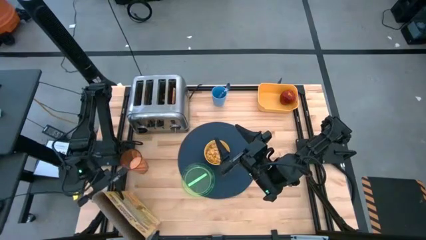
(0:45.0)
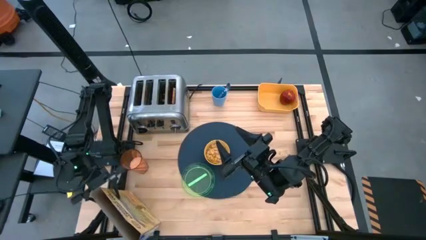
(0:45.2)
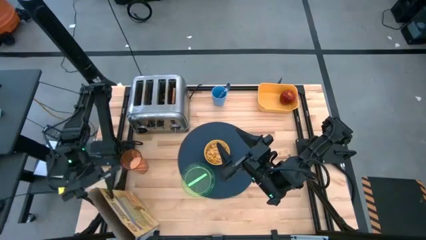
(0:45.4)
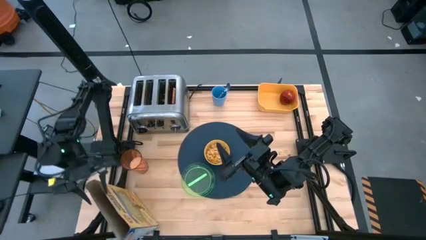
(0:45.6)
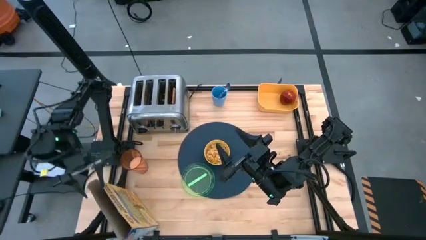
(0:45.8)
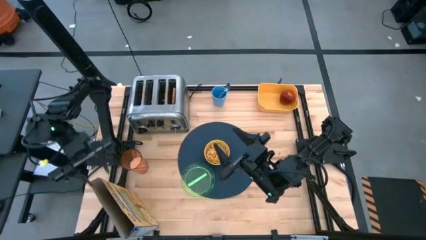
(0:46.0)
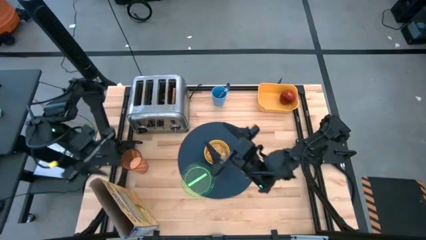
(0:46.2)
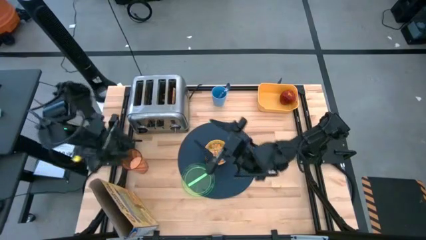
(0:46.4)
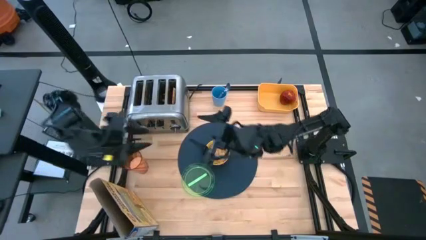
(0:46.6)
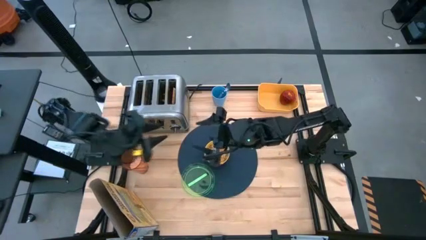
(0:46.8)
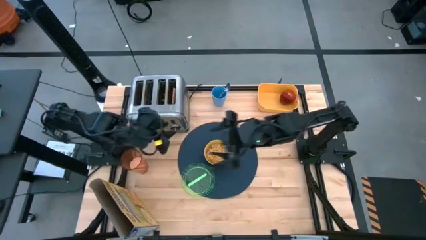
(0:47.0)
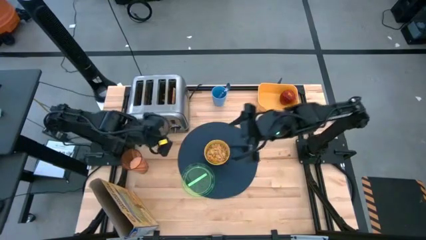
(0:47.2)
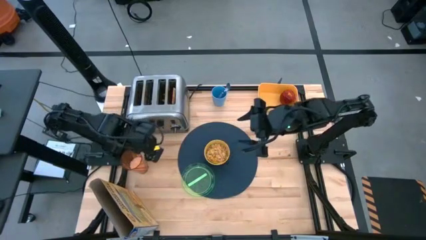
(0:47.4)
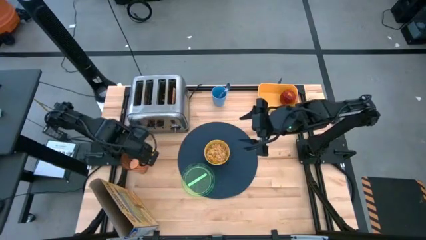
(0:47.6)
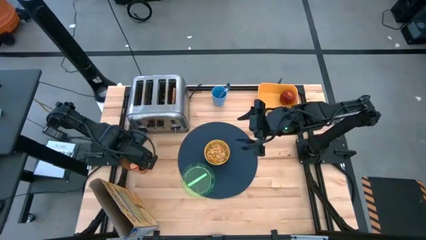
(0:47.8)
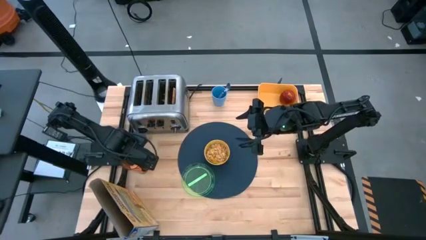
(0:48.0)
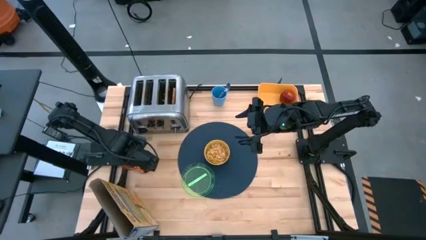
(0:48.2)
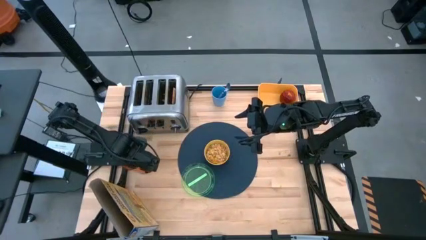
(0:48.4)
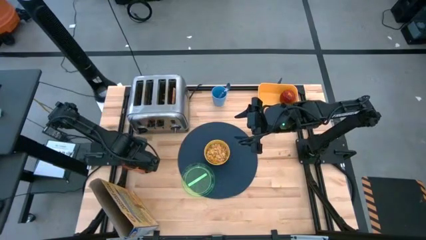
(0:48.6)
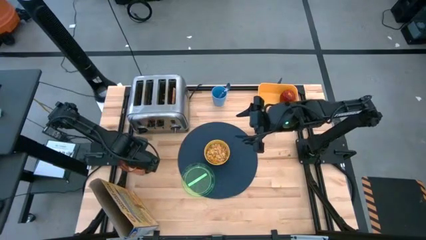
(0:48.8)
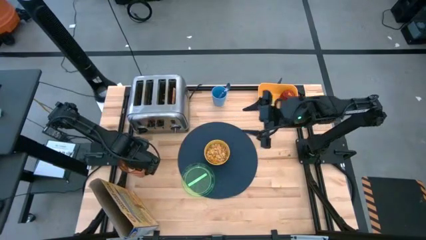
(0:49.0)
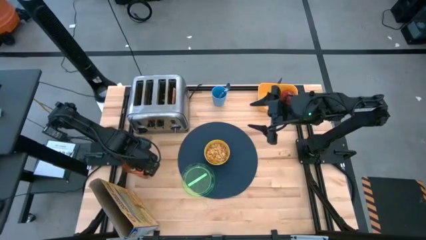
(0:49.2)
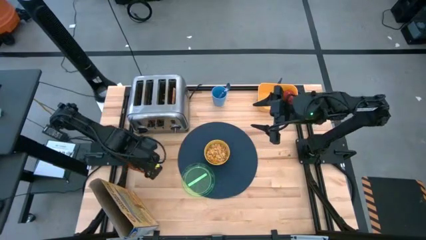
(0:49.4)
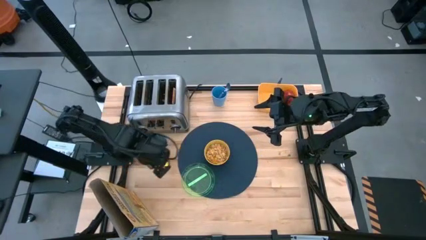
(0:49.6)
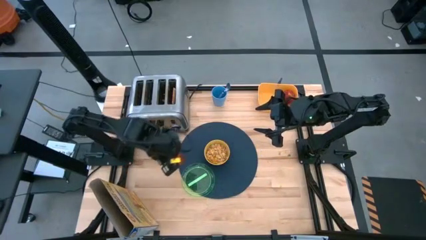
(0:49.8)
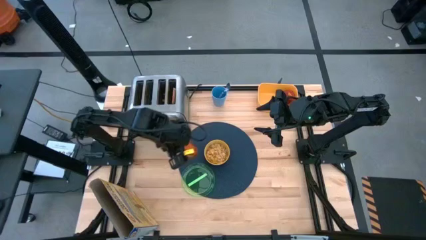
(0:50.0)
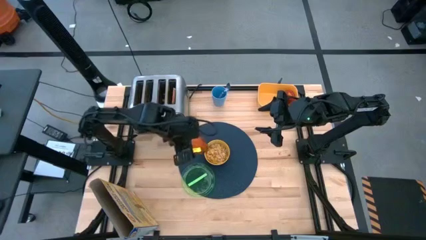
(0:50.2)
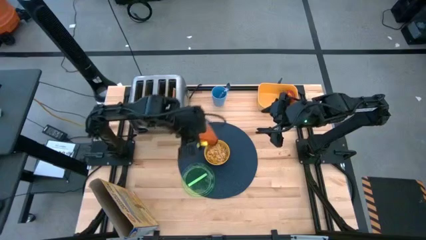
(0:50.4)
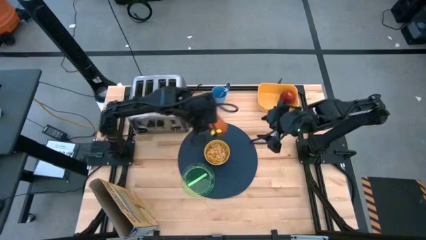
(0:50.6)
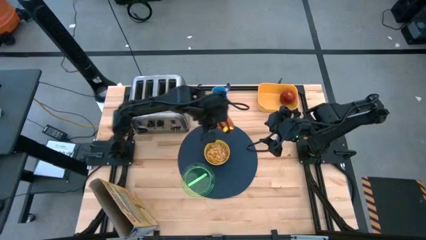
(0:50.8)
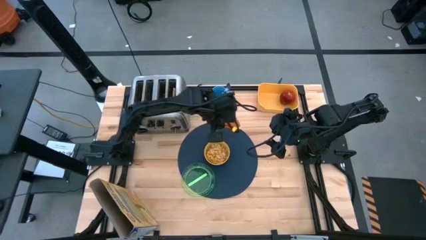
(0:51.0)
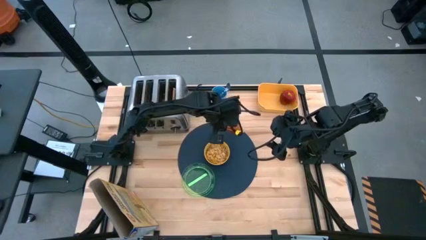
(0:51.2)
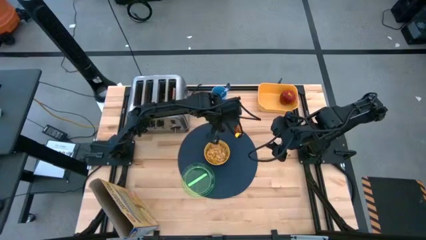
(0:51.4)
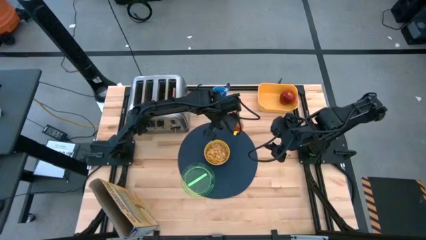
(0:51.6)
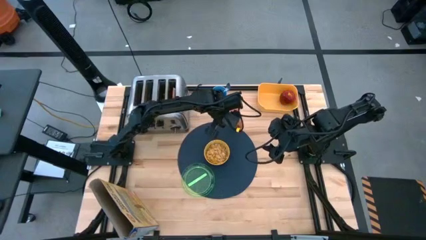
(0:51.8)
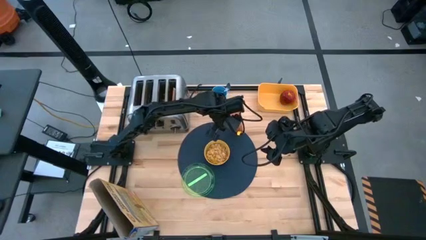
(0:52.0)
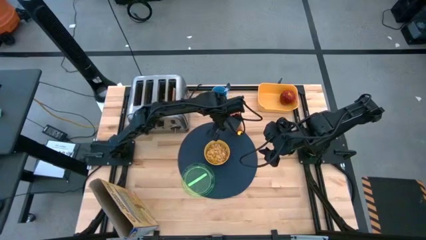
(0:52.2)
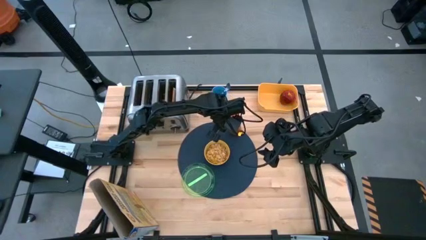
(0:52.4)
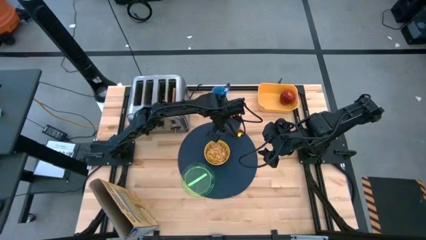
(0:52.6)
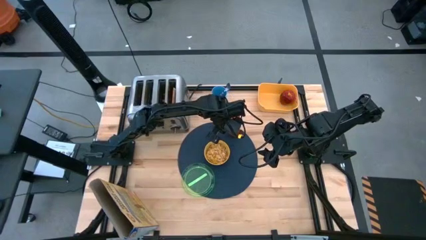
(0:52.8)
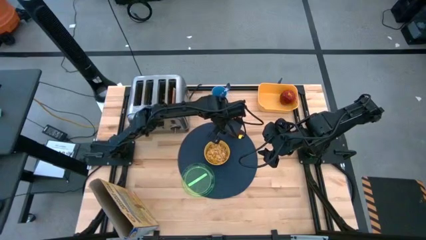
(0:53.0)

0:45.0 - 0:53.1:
Task: Arrange a breakfast setting
Put the cup of rice grain to the top right of the yellow bowl on the placemat

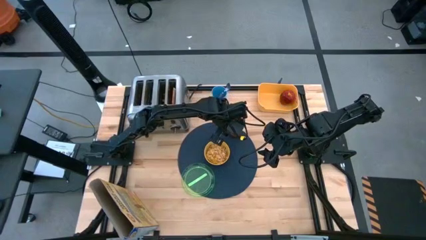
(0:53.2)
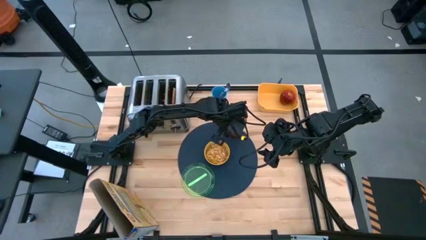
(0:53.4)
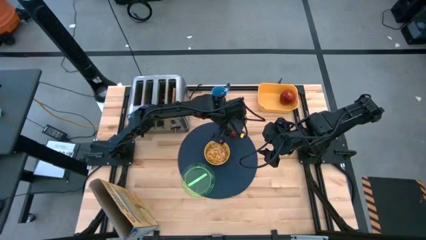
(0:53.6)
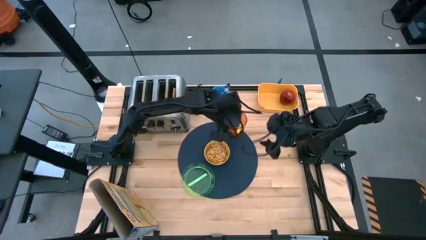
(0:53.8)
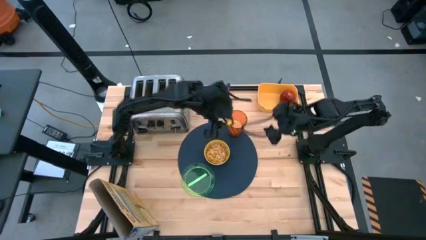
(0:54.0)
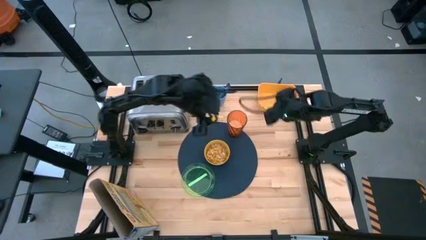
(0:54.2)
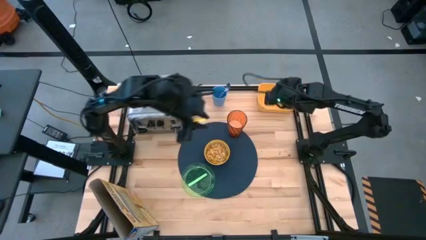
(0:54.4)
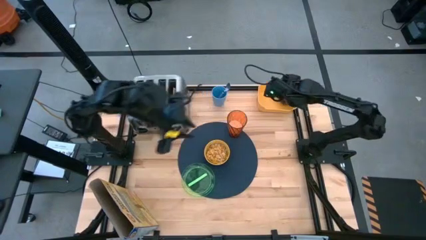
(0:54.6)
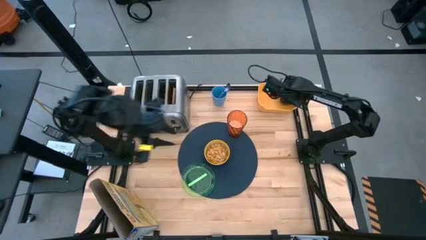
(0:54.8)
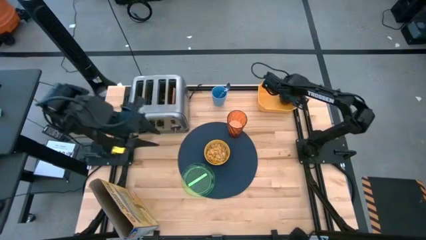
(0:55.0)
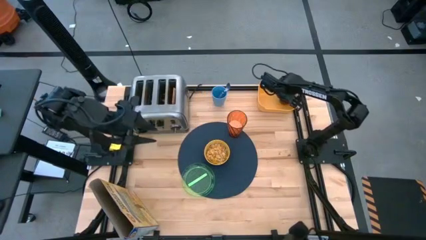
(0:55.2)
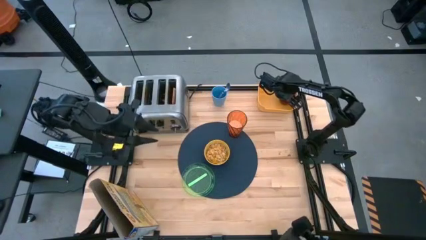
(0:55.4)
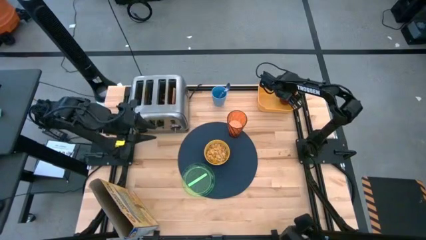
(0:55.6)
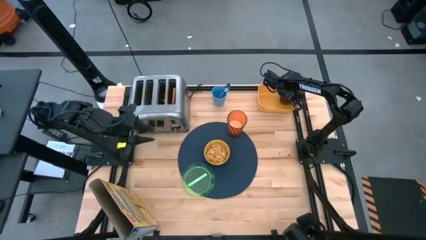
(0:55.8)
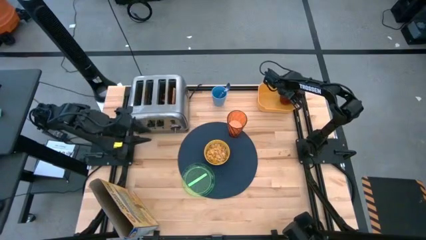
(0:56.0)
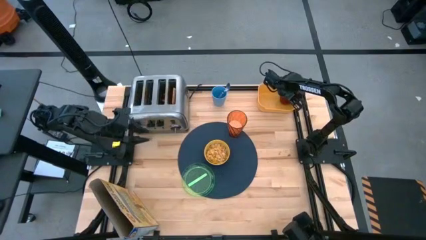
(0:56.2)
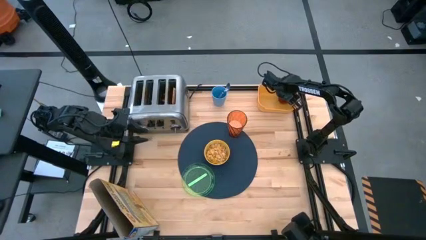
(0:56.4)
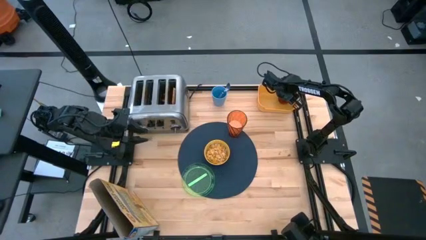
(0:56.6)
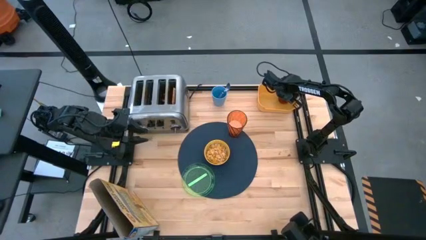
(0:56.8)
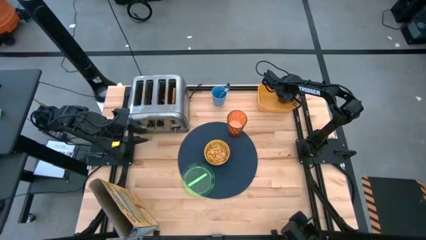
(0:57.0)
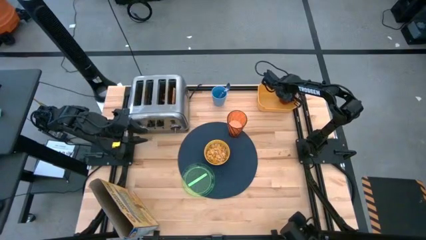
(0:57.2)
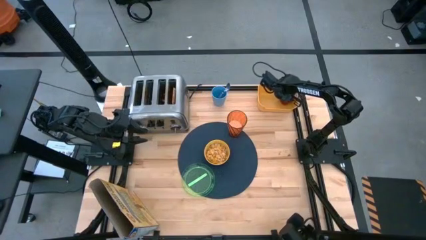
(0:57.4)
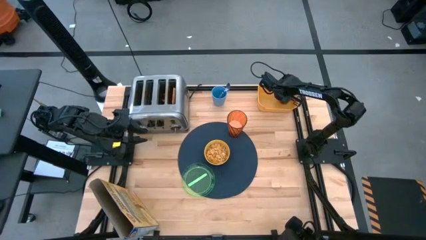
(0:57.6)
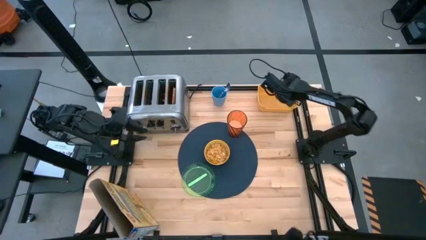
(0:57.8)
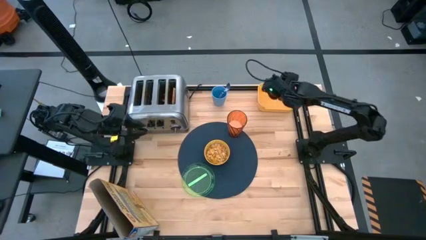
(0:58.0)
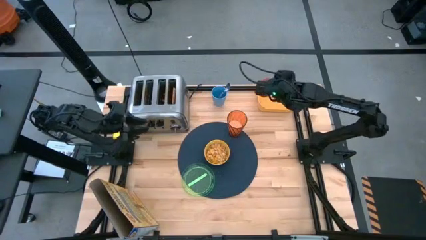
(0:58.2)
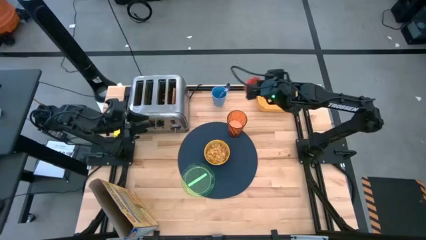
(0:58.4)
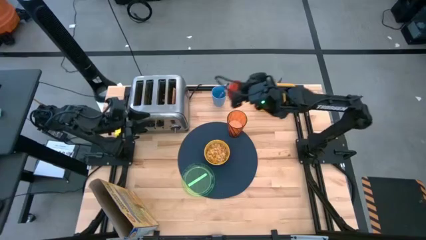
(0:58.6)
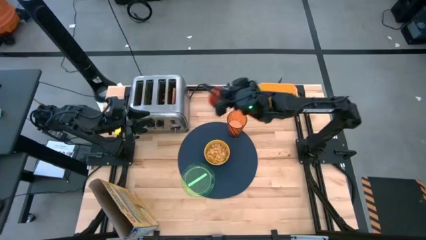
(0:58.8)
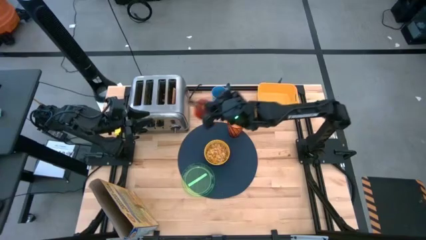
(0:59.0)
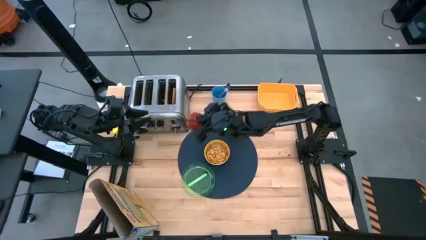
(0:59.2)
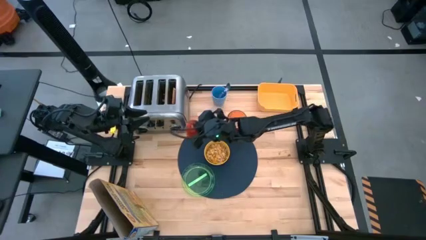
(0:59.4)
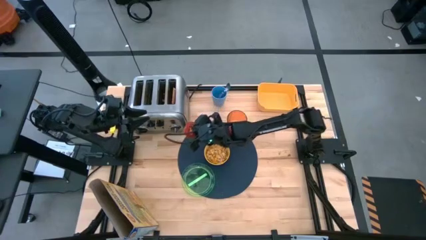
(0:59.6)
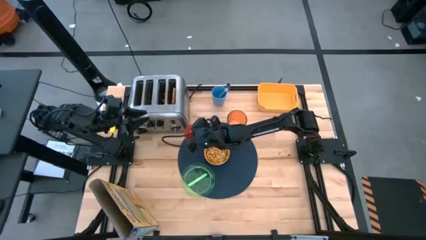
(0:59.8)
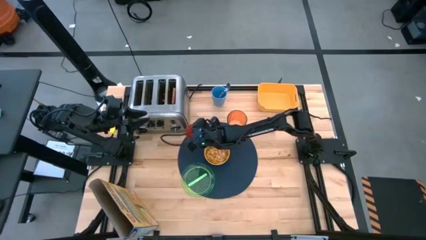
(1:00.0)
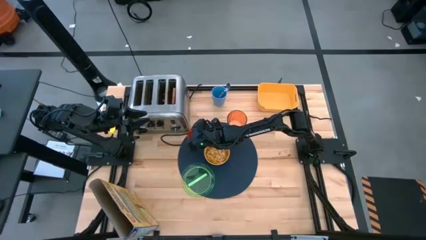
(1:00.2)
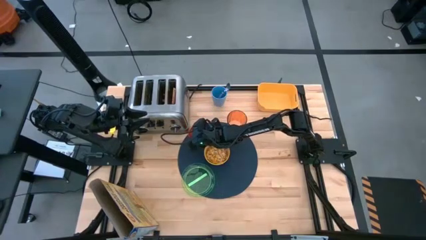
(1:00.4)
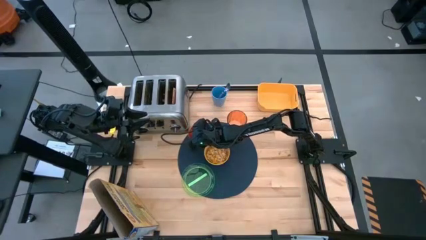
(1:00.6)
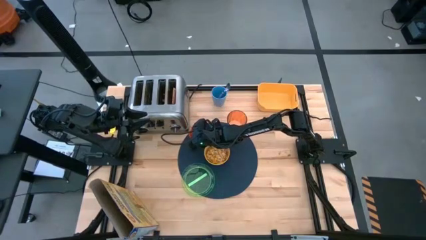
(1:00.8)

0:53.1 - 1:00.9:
Put the apple from the orange bin to the top left of the yellow bowl on the placemat
